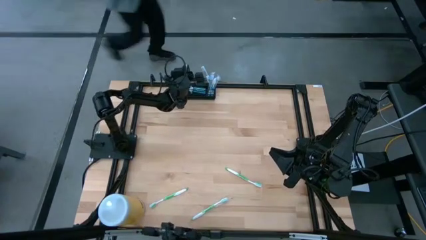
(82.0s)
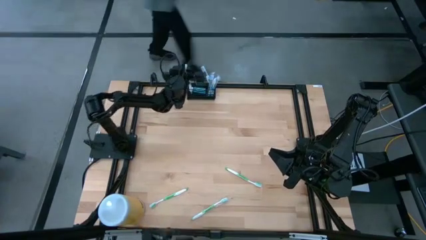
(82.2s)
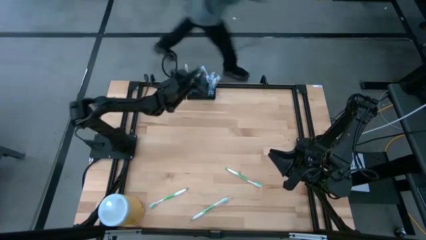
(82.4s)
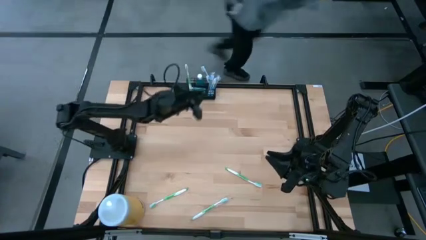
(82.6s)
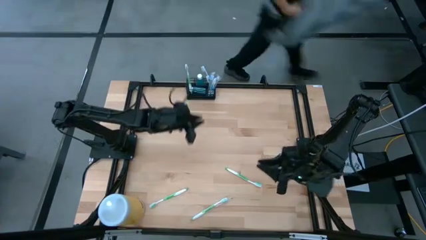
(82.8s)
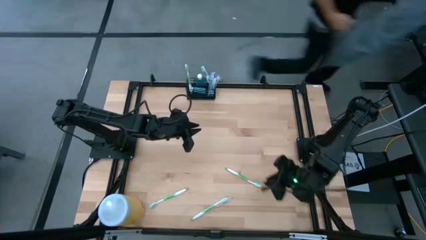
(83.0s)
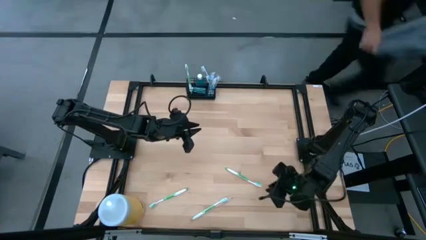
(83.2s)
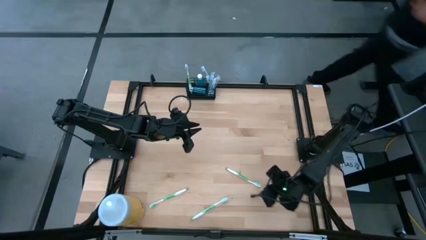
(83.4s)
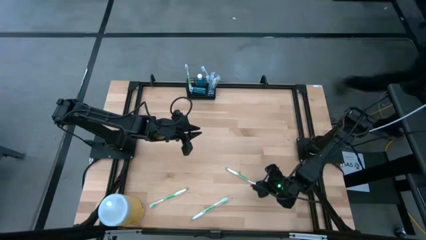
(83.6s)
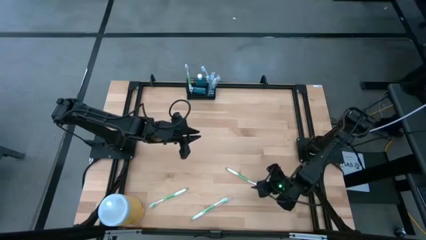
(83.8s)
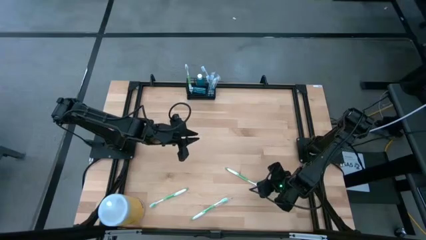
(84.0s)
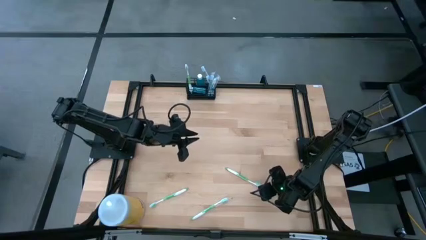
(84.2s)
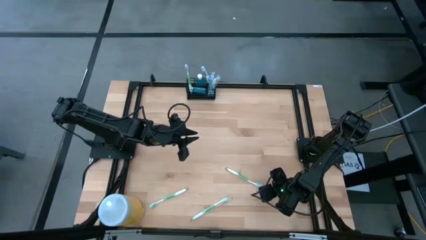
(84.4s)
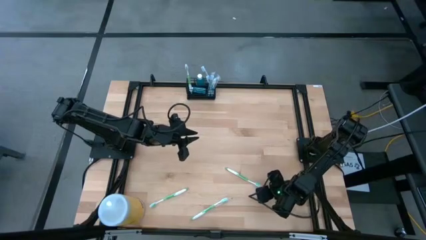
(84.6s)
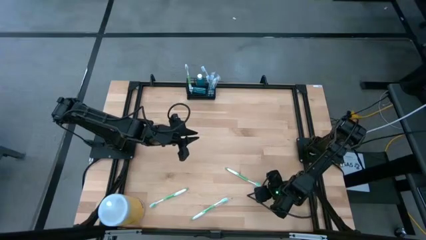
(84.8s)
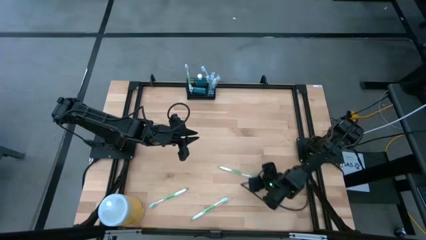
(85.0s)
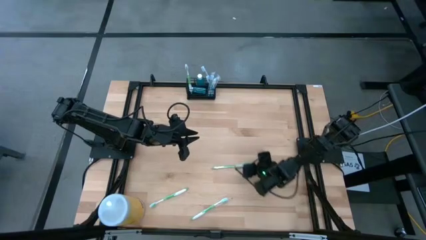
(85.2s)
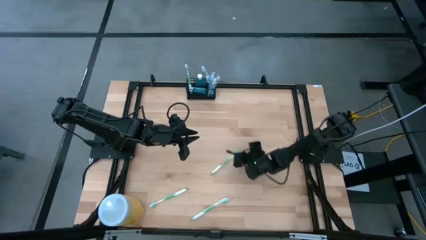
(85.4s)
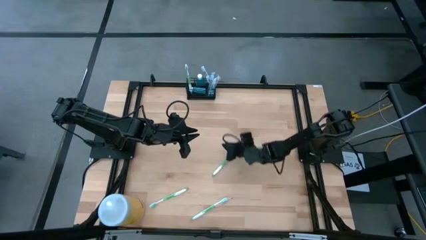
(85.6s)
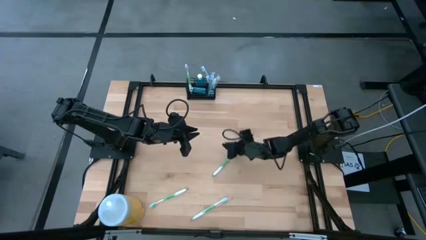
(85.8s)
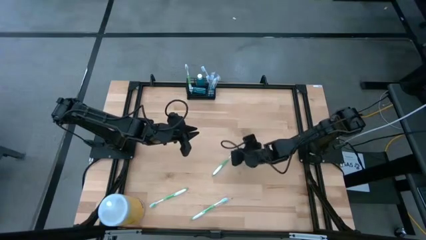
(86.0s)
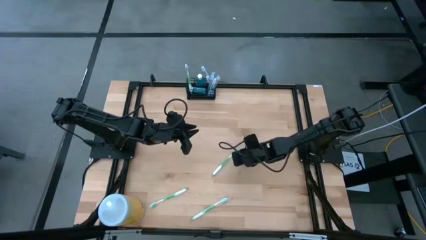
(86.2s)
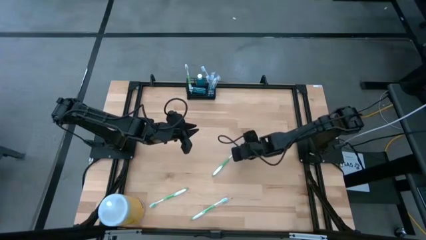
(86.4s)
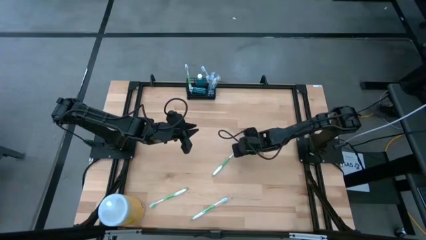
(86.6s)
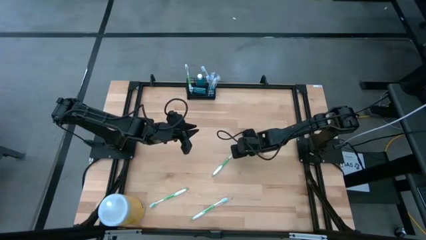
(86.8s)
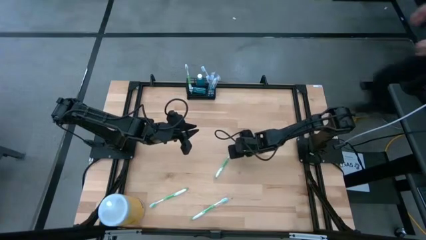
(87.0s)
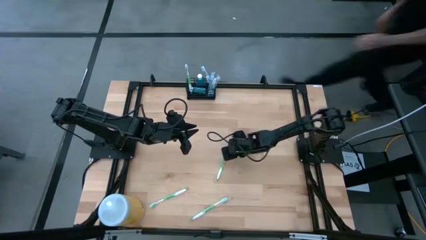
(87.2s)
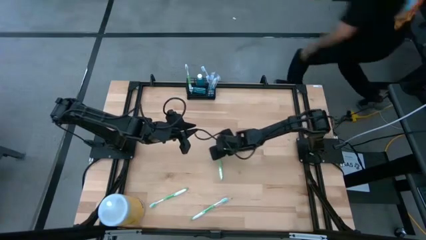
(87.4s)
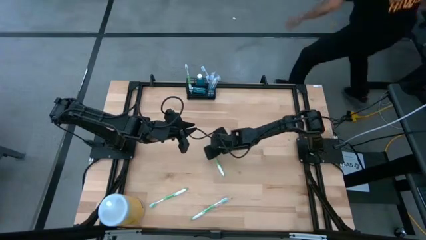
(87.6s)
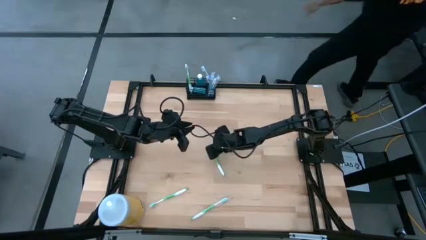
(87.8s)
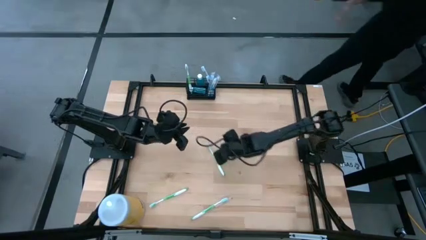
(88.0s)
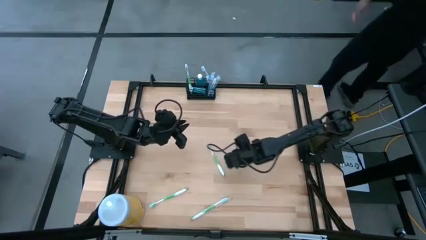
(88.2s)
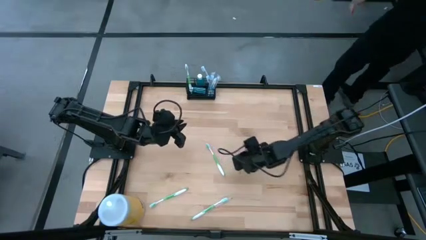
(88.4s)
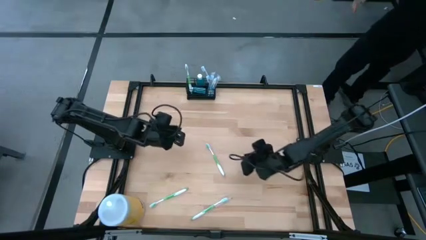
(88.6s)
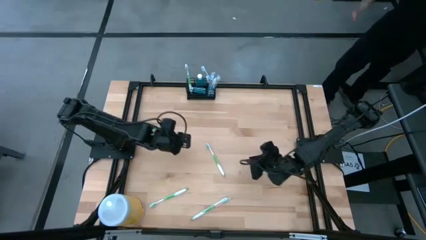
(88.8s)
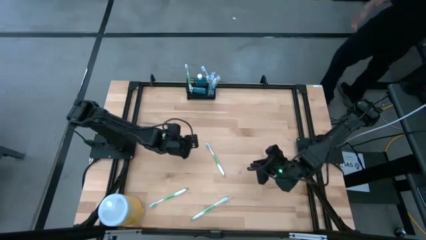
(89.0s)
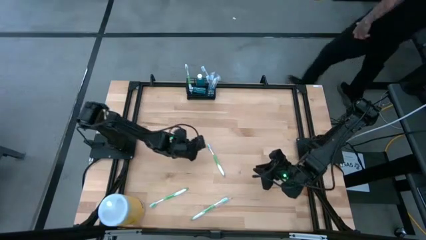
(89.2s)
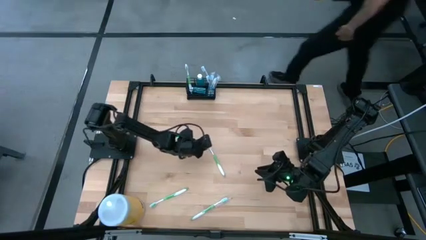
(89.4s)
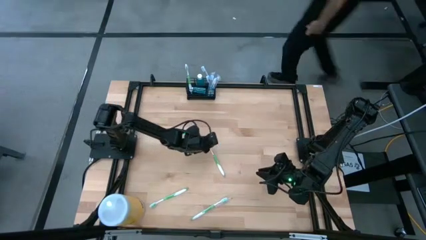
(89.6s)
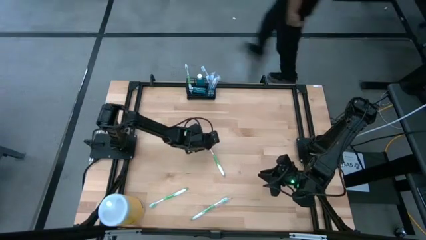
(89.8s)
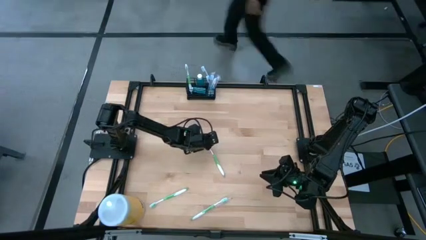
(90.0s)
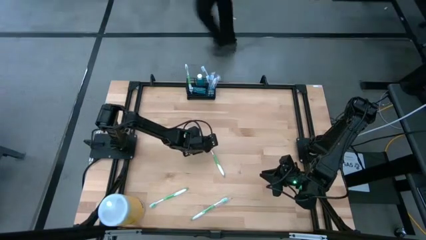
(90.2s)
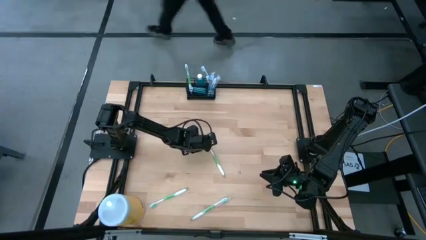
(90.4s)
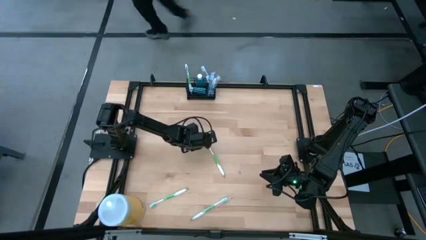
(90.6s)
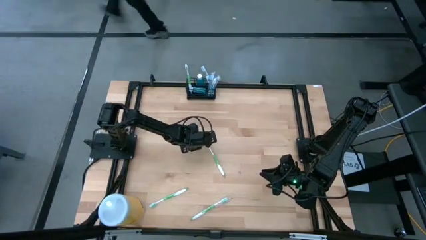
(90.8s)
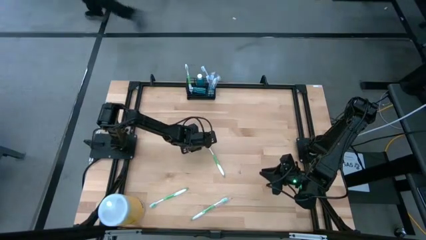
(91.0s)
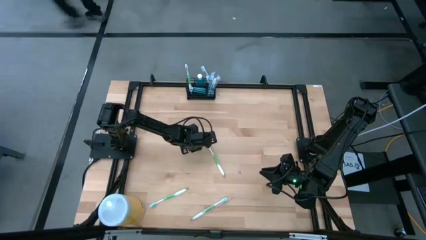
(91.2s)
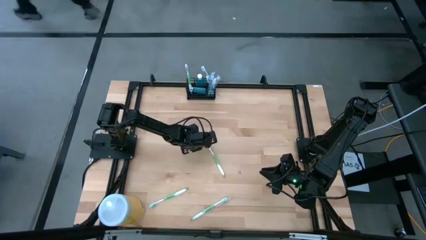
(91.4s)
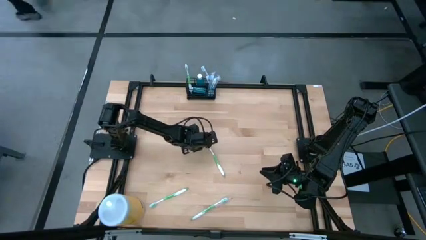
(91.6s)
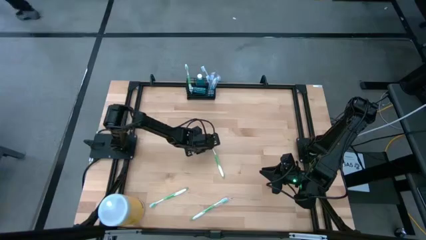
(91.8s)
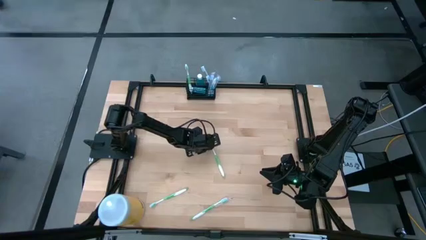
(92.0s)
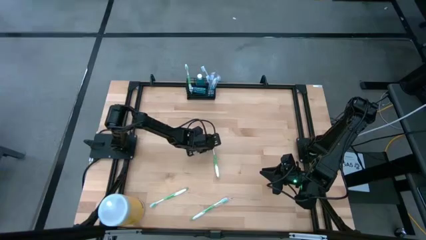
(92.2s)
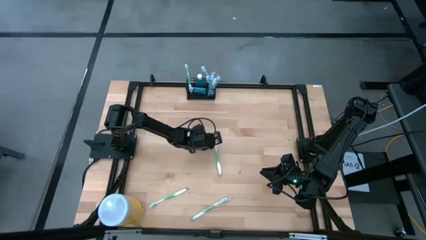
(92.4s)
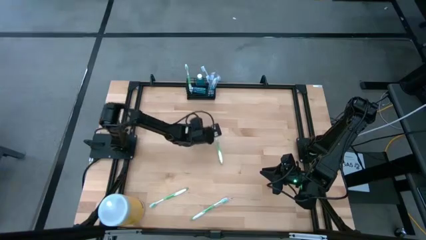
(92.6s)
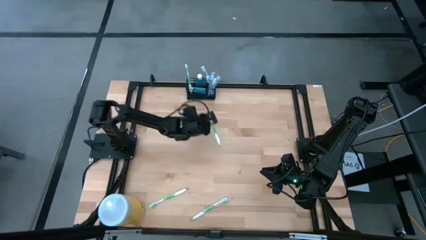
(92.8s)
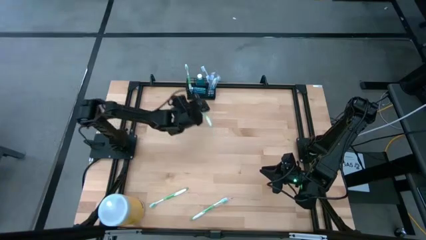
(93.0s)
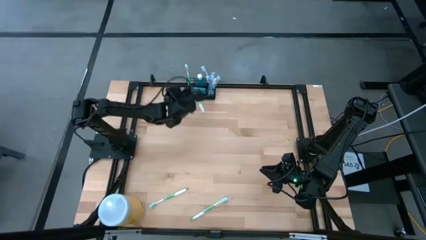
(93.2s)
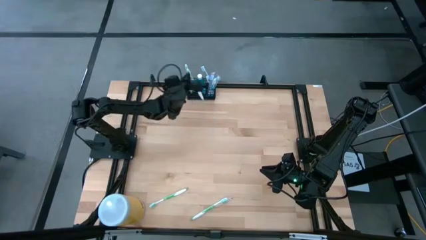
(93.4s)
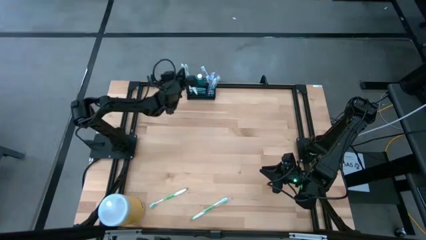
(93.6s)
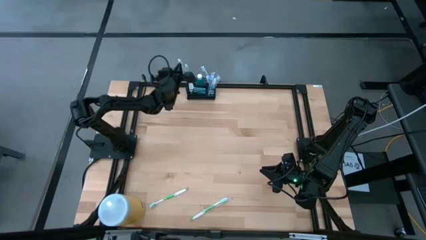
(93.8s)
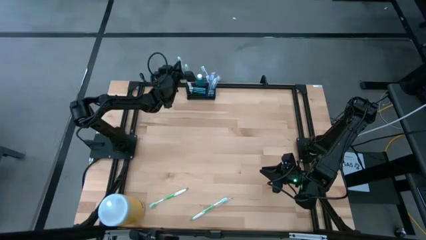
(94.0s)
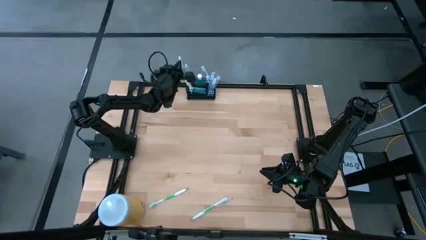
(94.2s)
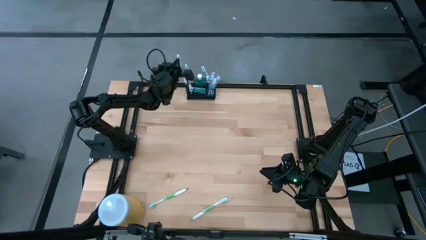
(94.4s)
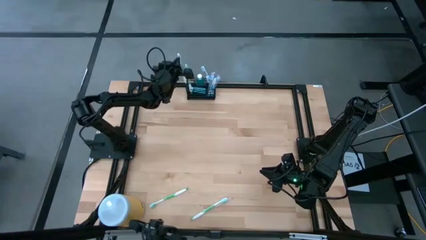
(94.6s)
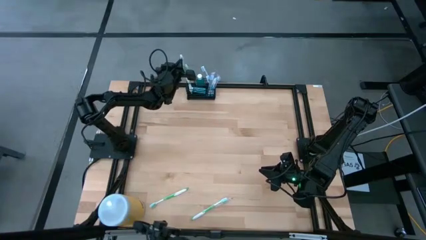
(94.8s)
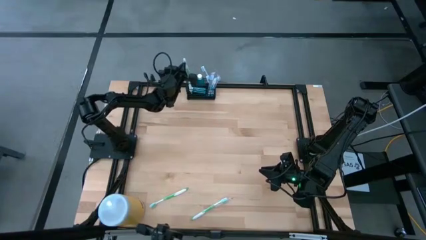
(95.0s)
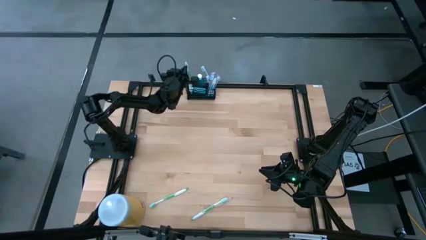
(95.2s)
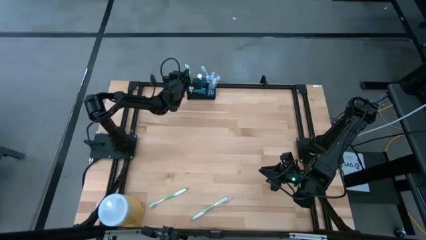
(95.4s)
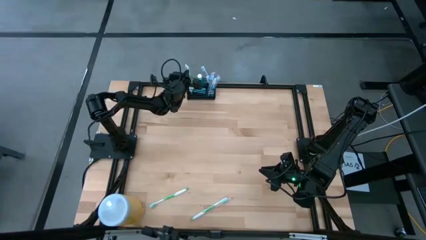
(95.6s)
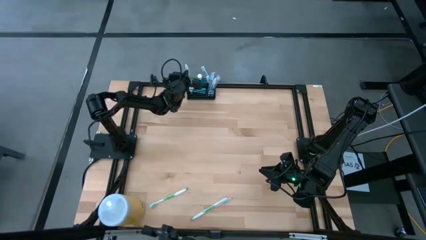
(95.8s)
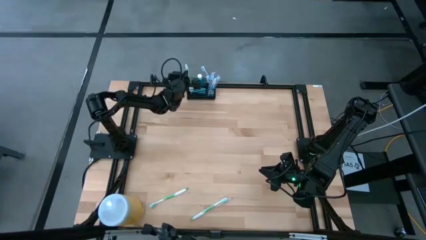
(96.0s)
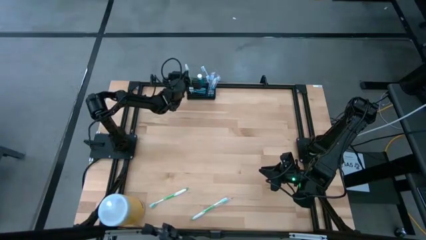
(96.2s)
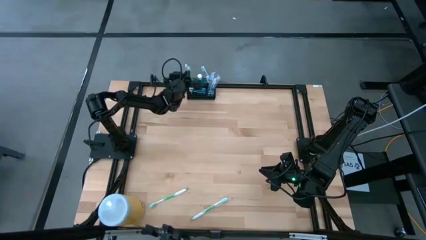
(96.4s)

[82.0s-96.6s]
Task: Pick & Place toothbrushing station
Put the green toothbrush into the wire organizer
